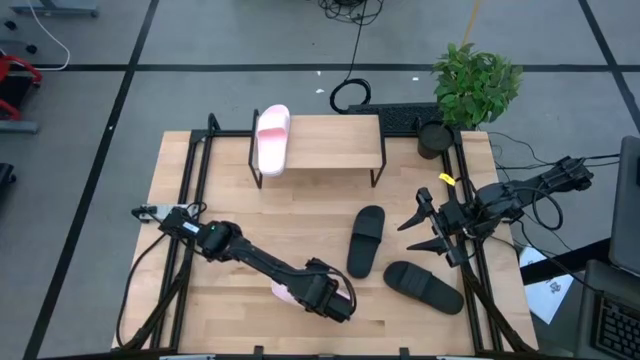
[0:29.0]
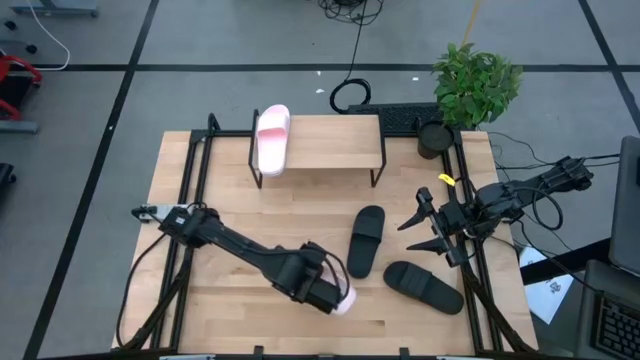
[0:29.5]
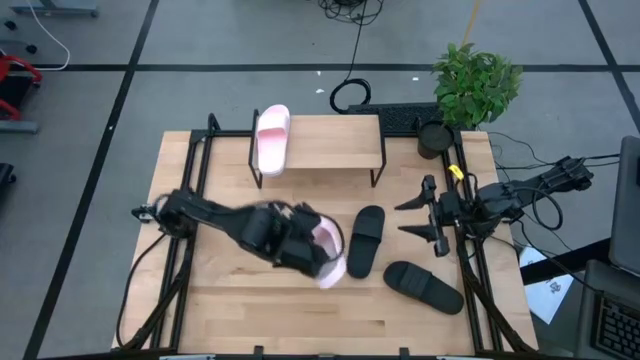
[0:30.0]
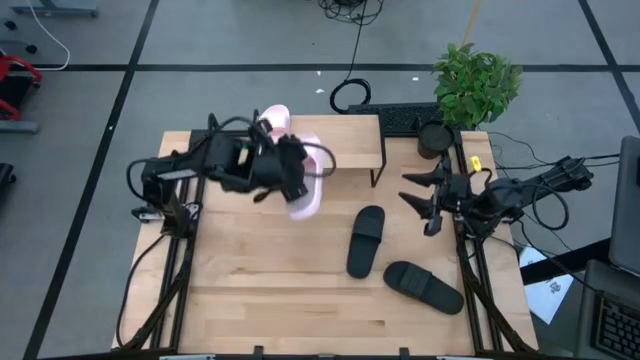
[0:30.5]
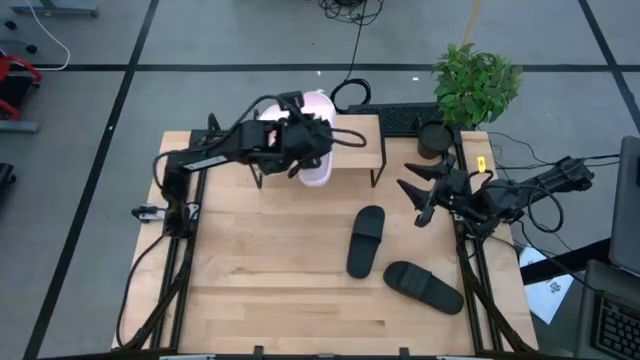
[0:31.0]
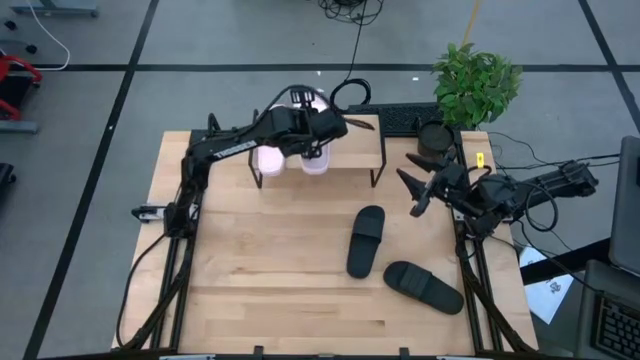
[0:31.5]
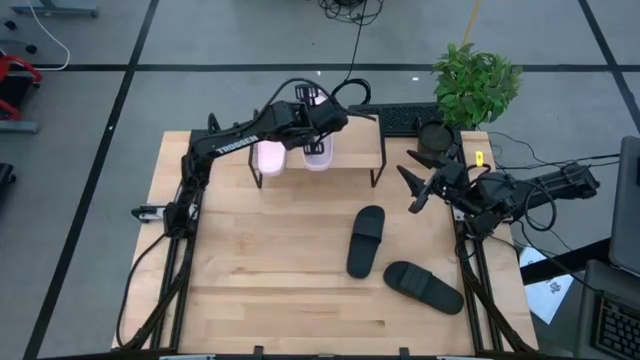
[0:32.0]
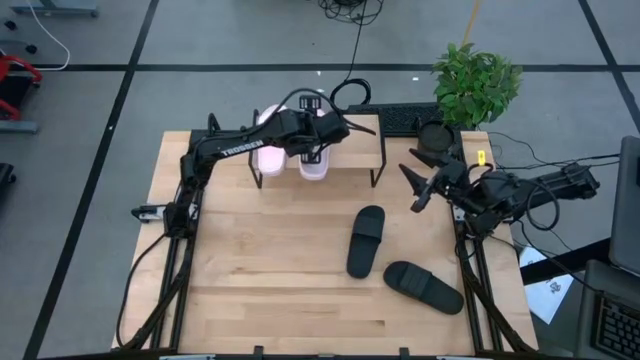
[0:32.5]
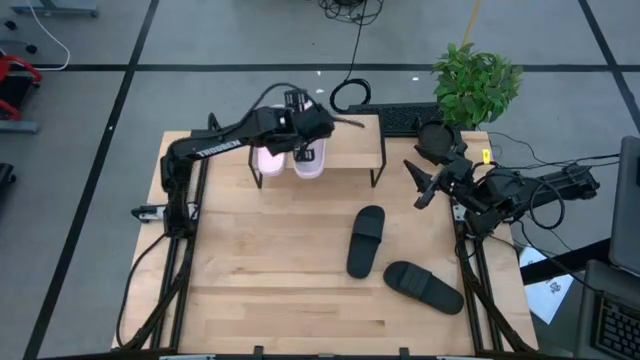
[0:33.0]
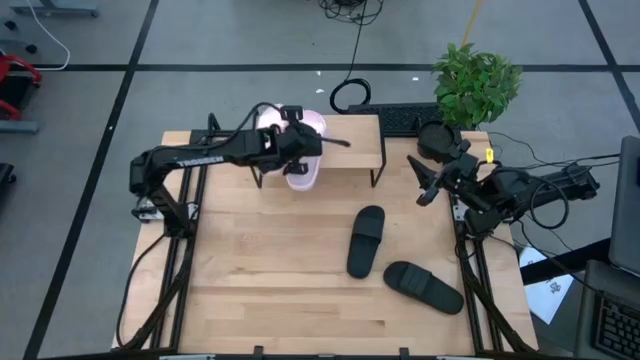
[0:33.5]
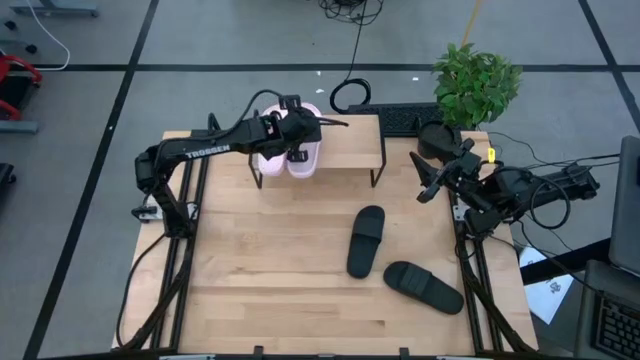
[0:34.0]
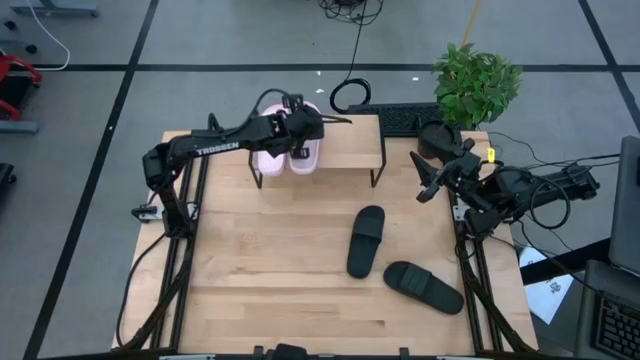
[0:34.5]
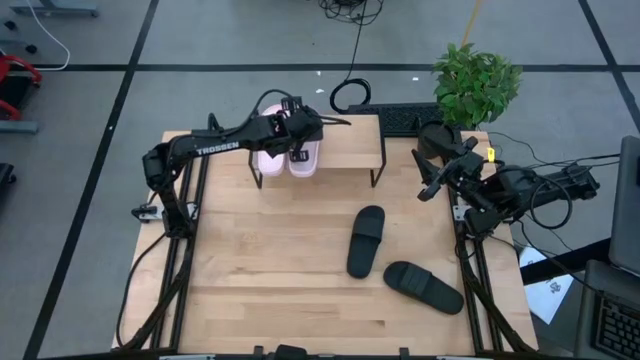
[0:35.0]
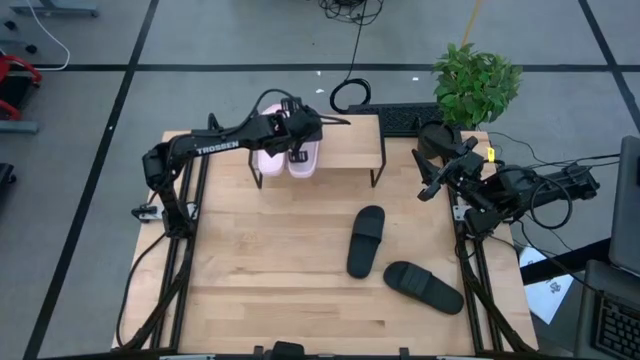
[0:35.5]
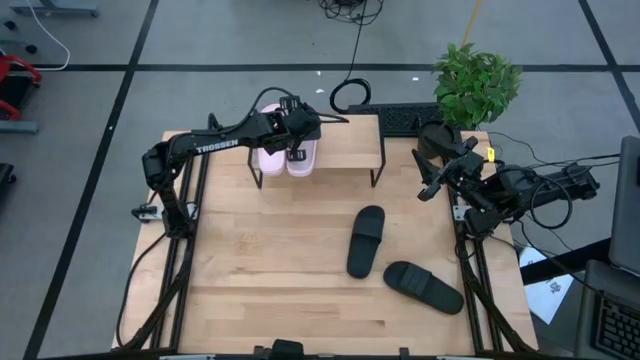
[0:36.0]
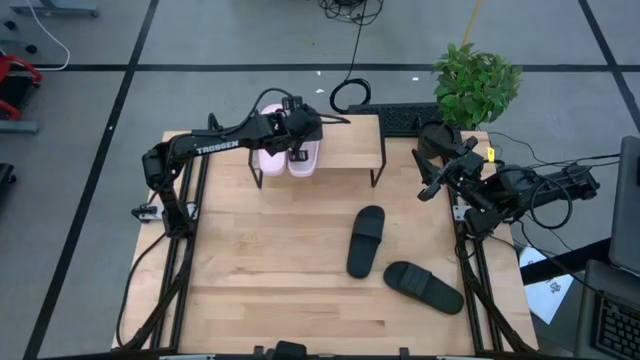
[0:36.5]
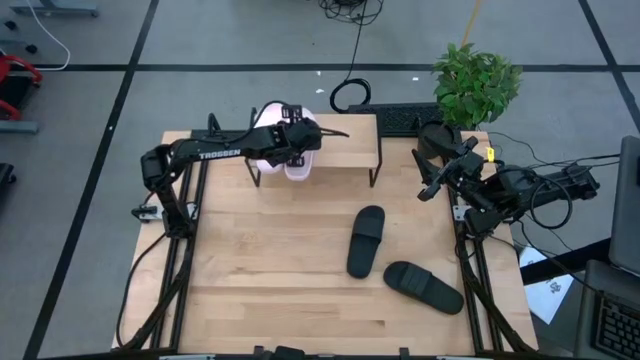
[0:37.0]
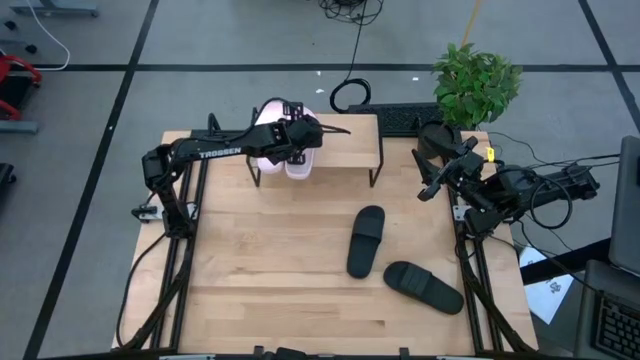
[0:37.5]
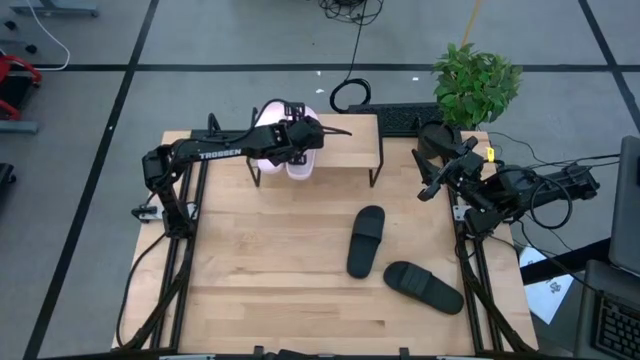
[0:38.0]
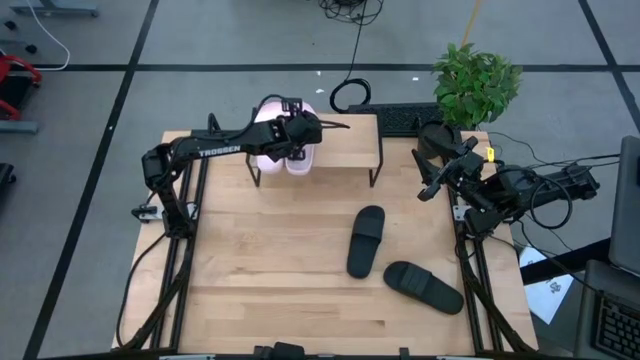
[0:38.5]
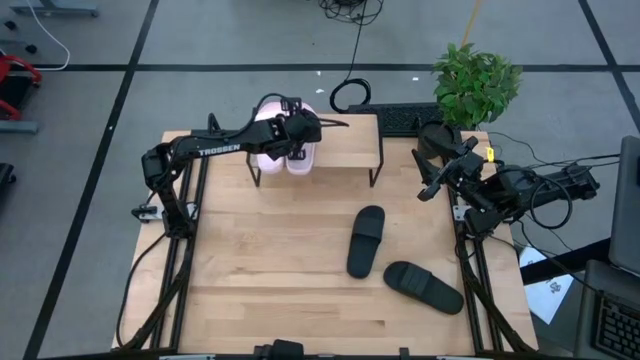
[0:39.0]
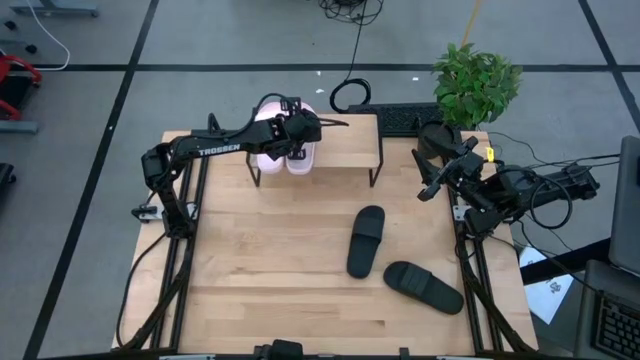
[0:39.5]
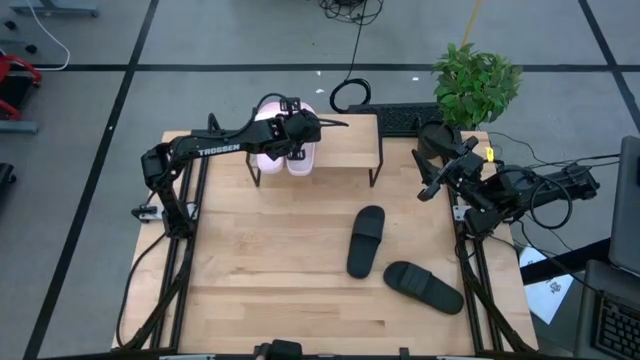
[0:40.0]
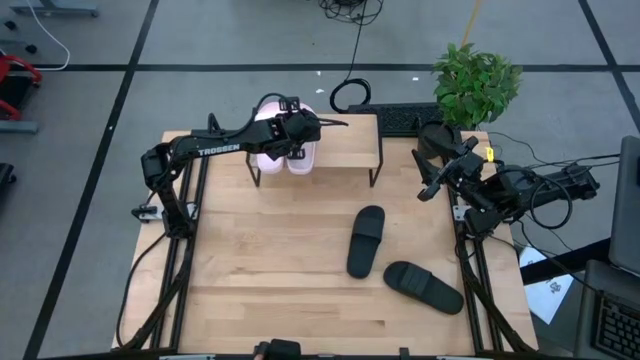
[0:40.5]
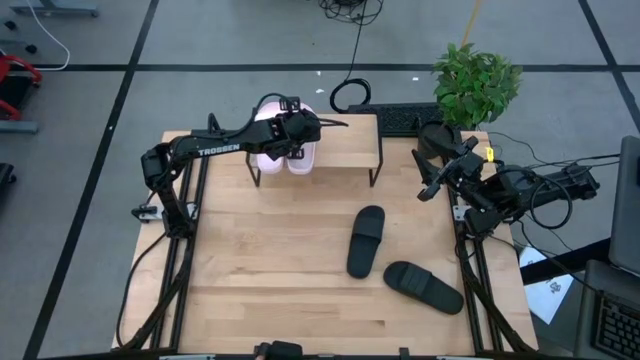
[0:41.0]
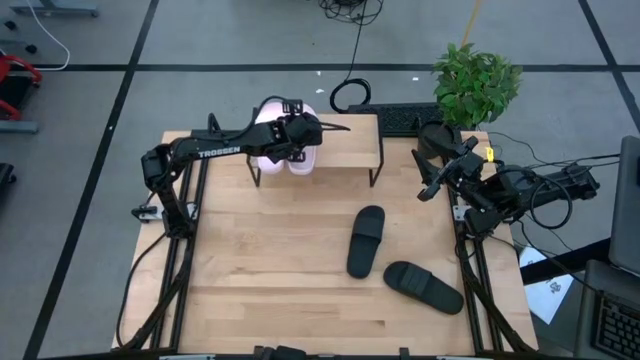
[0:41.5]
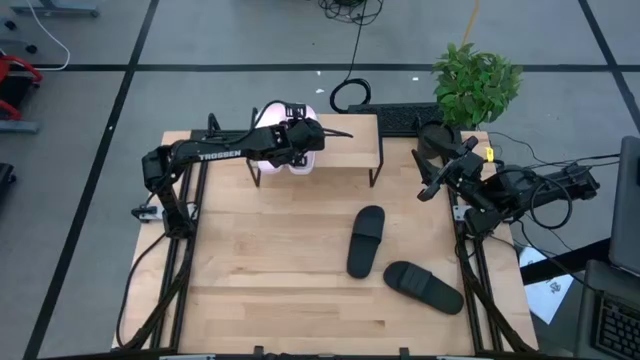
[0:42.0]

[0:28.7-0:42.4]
Task: Pick and place slides into the shelf
Put the pink slide on the shelf

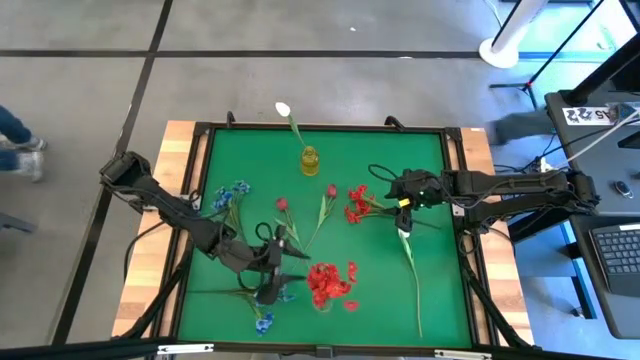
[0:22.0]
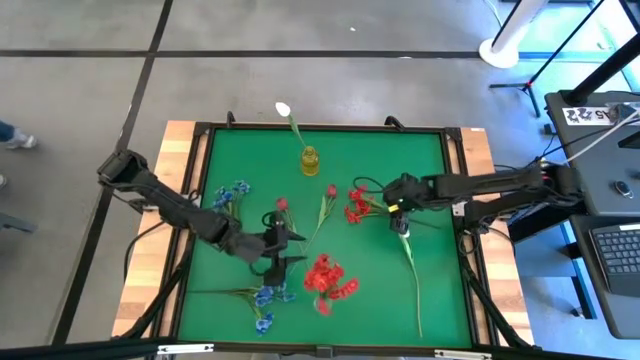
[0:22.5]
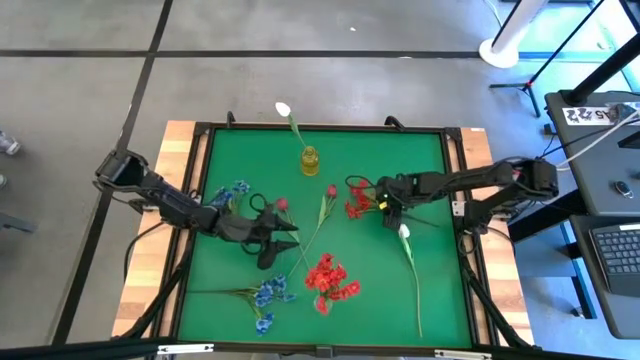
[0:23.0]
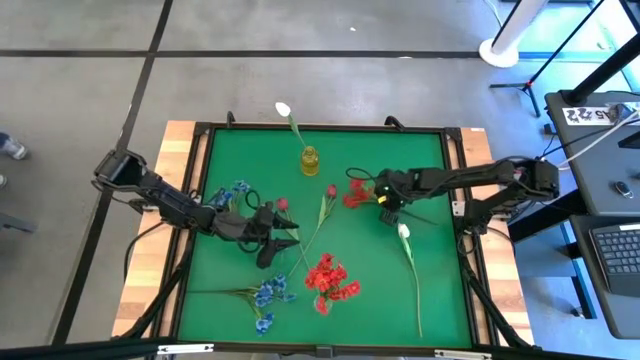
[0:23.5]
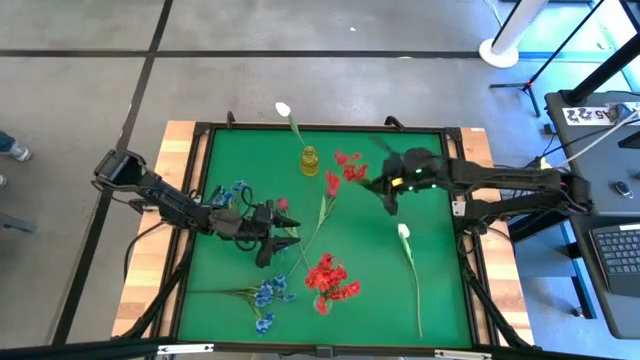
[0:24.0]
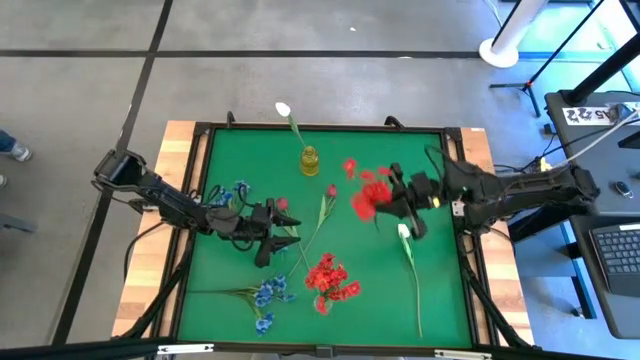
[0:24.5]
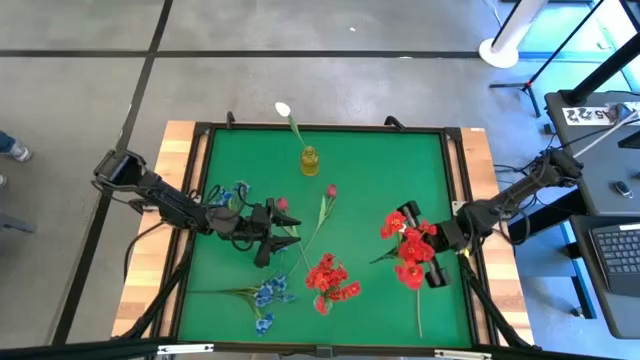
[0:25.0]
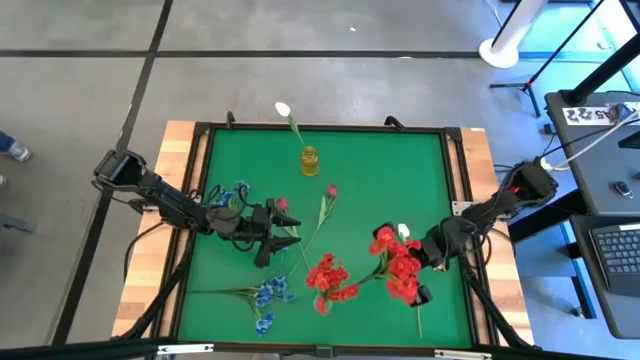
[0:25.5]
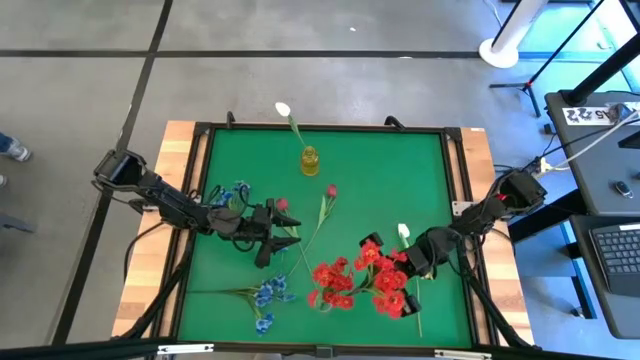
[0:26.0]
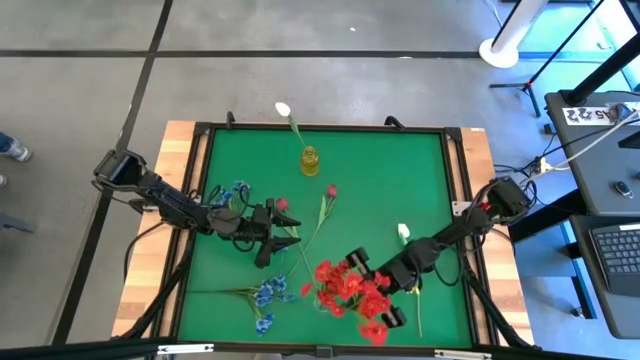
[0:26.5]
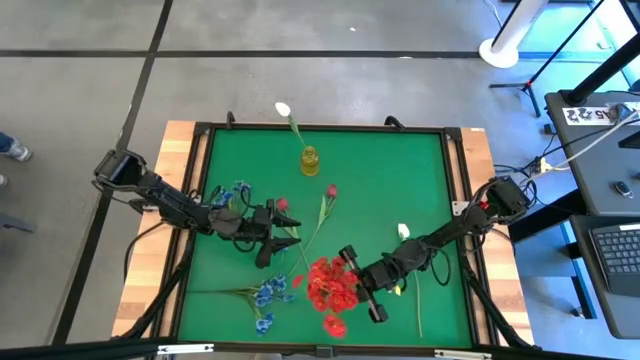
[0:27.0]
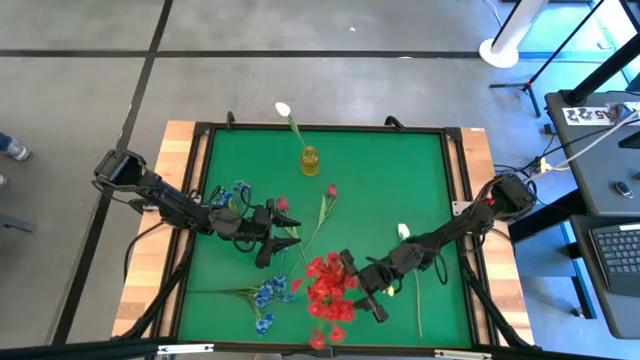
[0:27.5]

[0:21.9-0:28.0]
Task: Sort flowers into vase by color
Put the orange flower into the transparent vase

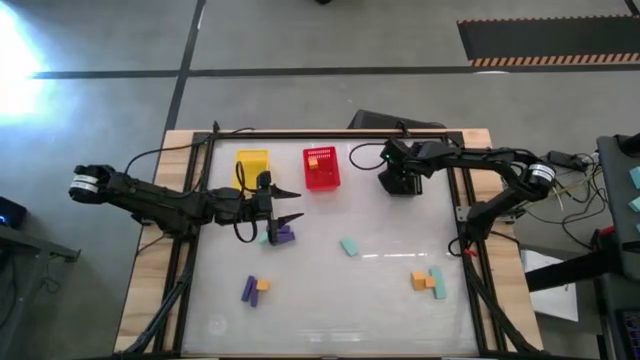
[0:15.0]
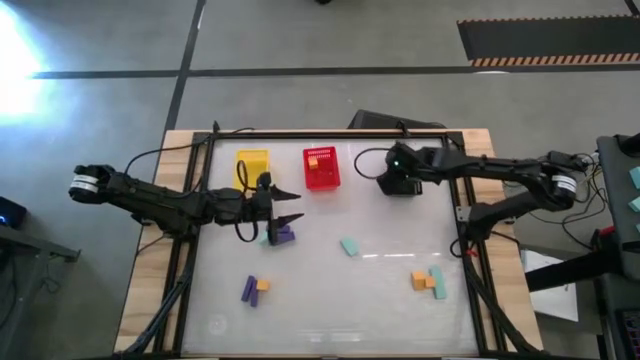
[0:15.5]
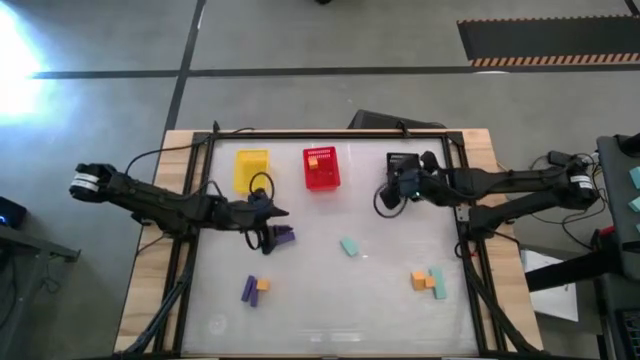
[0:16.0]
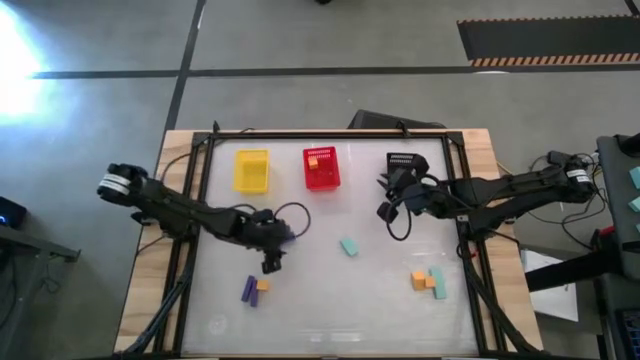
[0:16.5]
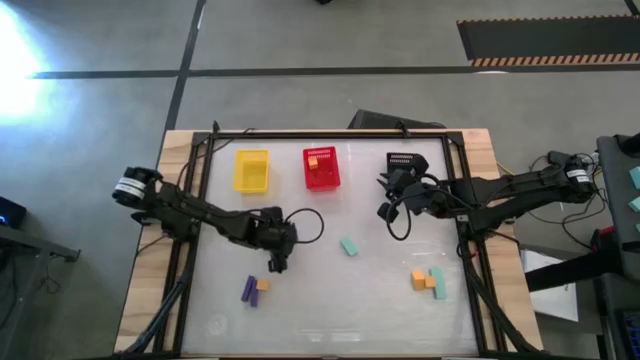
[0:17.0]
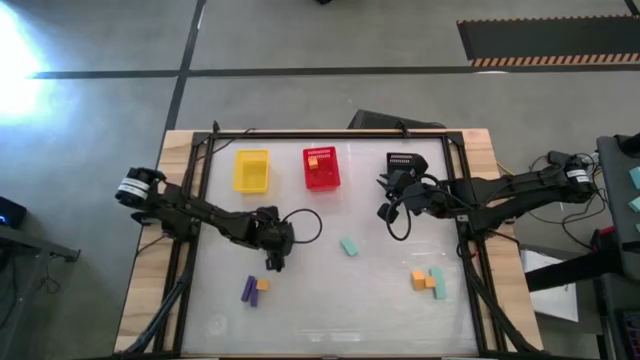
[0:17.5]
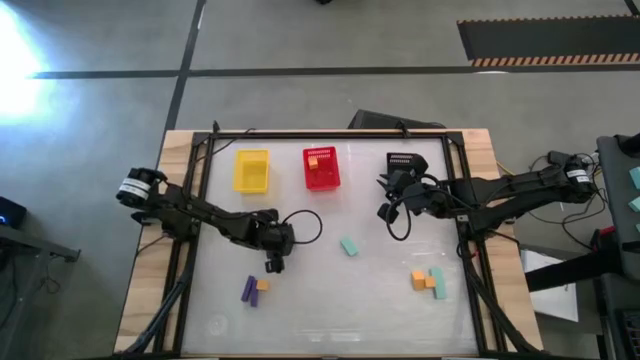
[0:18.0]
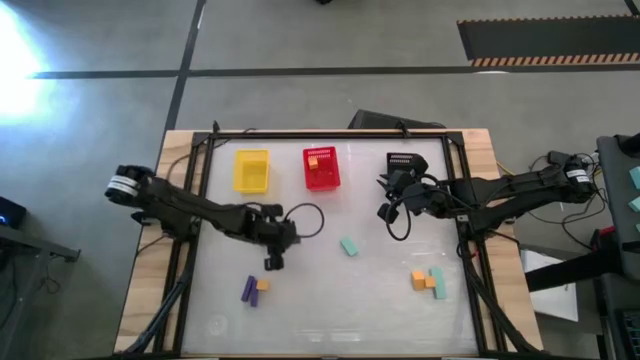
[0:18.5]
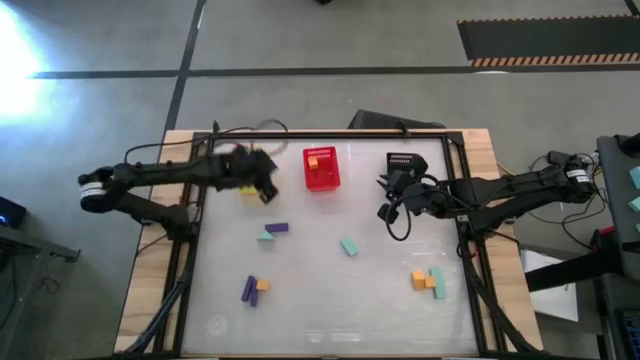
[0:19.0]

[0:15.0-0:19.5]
Task: Sort & place blocks by color
Put the purple block into the yellow bin
